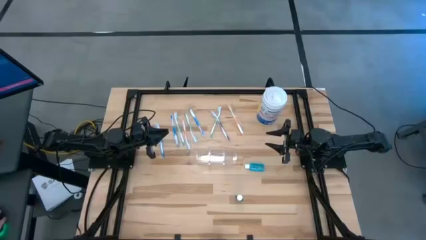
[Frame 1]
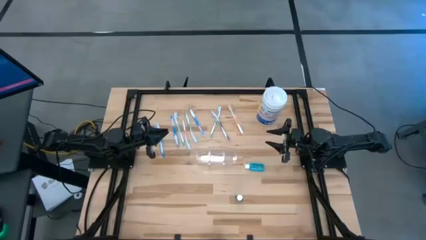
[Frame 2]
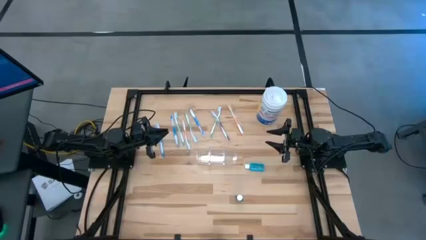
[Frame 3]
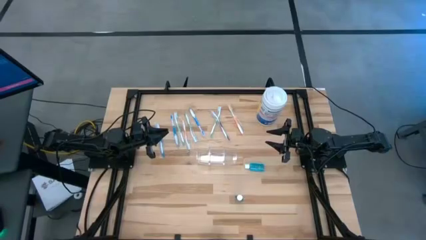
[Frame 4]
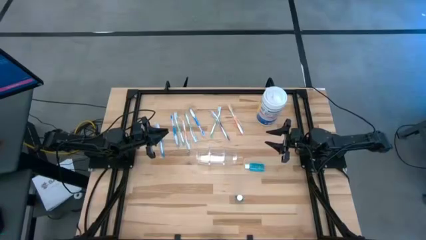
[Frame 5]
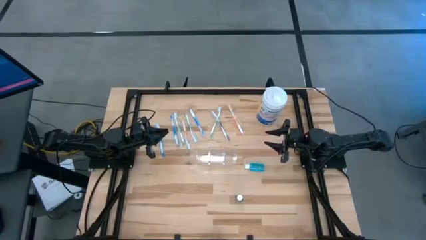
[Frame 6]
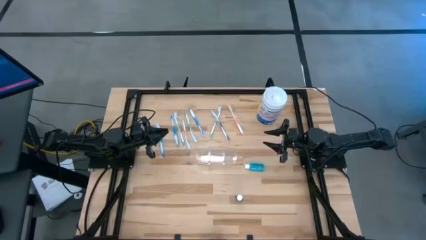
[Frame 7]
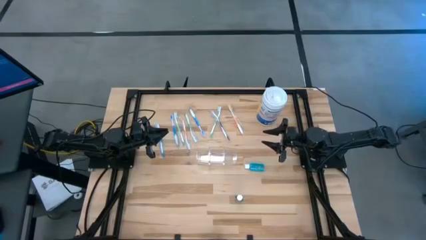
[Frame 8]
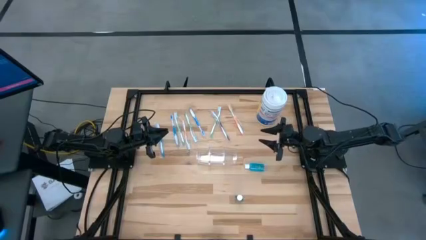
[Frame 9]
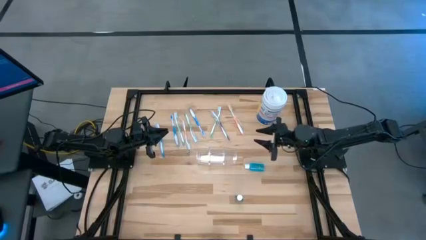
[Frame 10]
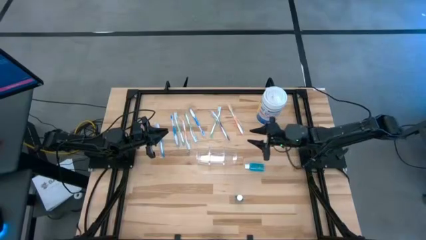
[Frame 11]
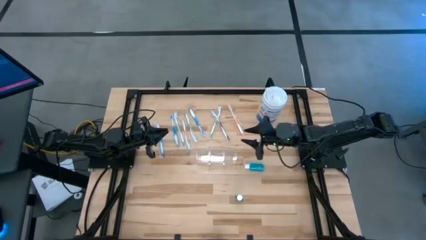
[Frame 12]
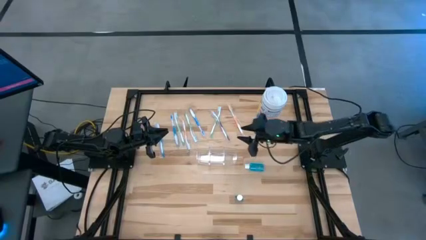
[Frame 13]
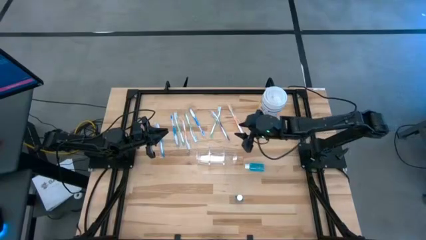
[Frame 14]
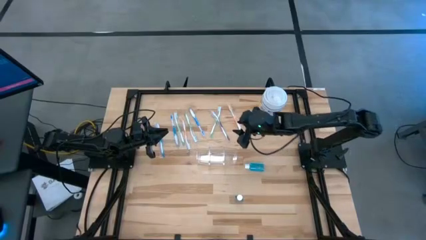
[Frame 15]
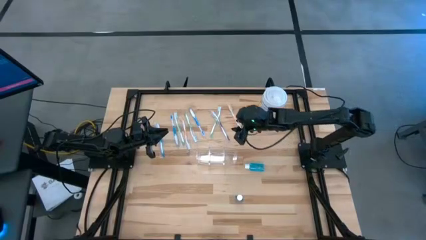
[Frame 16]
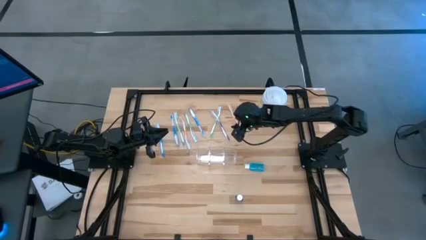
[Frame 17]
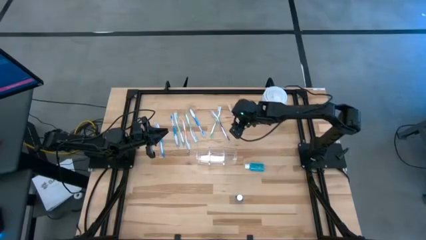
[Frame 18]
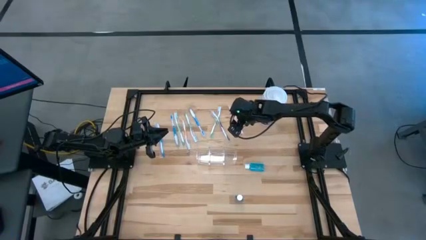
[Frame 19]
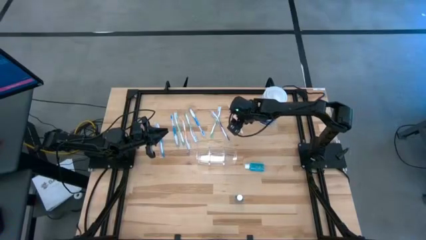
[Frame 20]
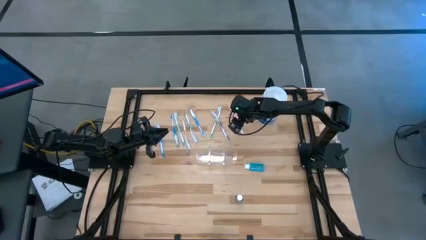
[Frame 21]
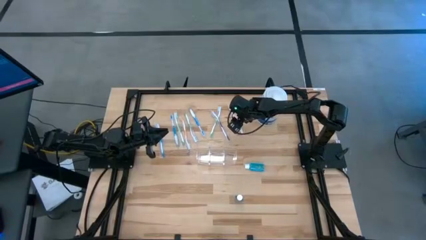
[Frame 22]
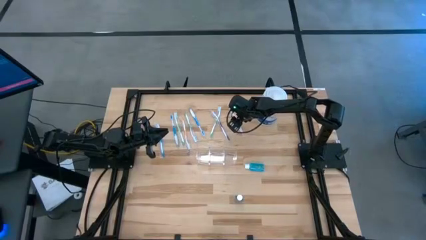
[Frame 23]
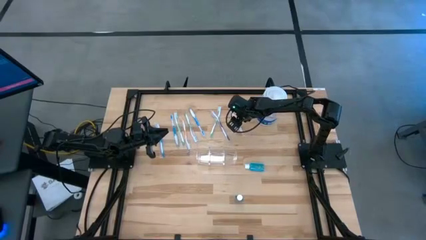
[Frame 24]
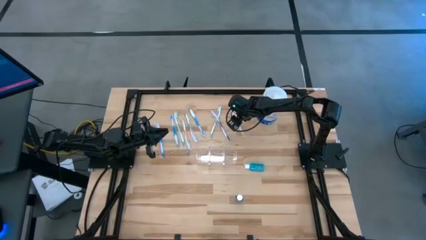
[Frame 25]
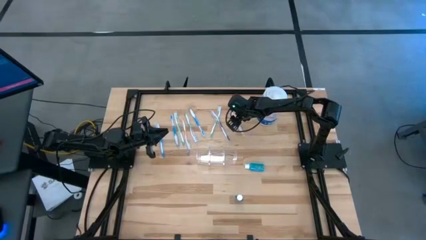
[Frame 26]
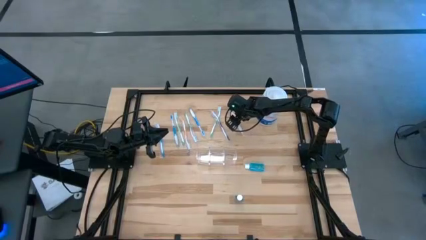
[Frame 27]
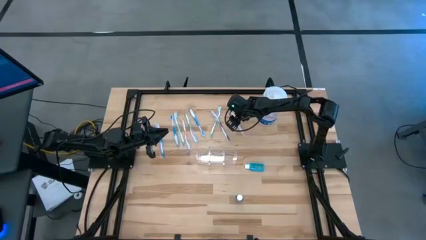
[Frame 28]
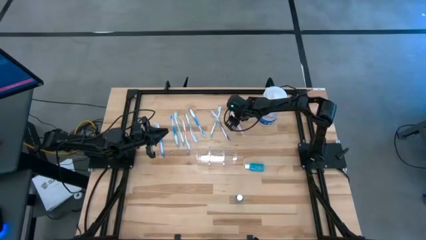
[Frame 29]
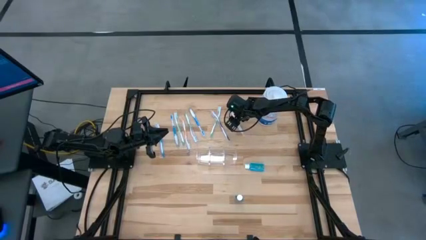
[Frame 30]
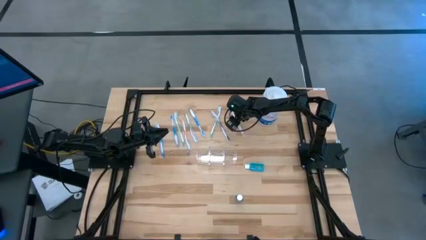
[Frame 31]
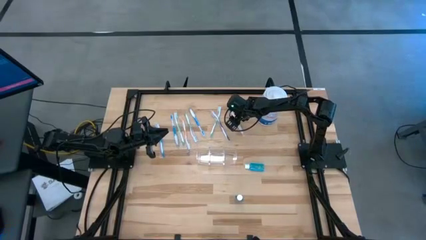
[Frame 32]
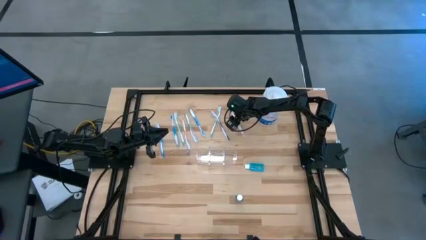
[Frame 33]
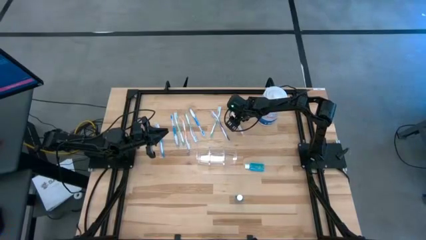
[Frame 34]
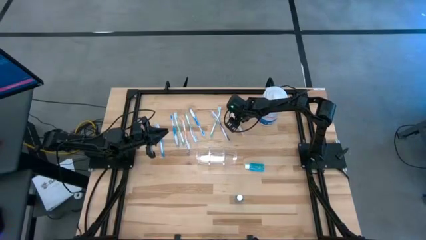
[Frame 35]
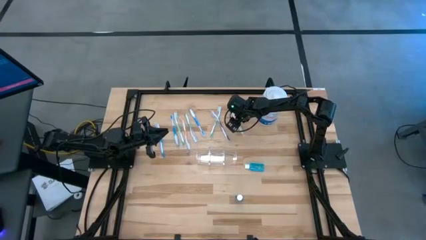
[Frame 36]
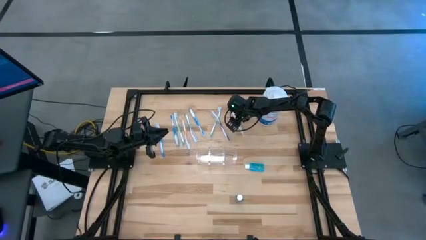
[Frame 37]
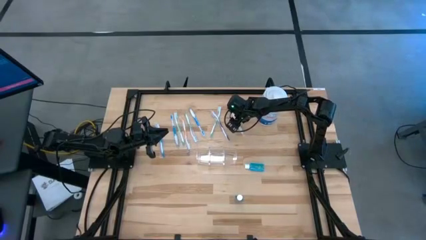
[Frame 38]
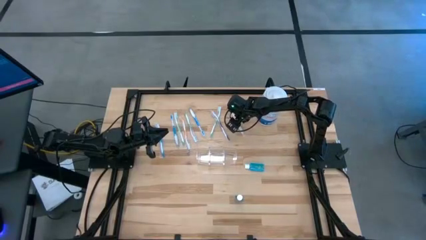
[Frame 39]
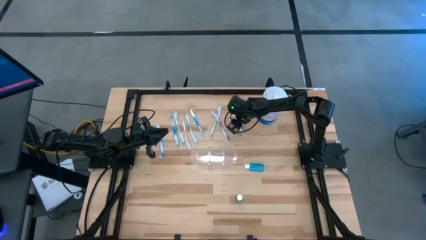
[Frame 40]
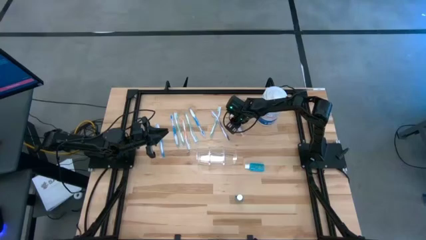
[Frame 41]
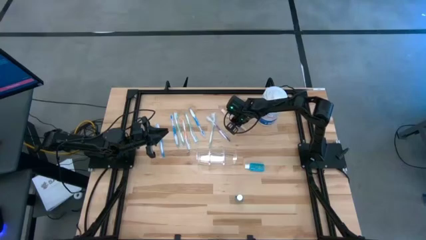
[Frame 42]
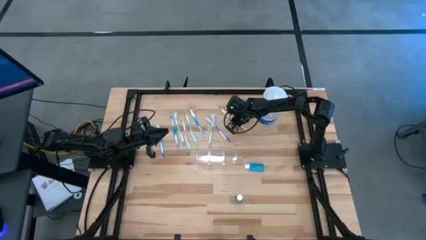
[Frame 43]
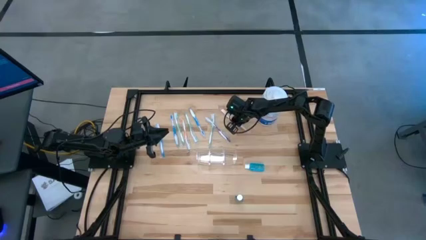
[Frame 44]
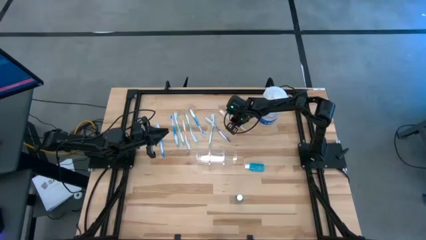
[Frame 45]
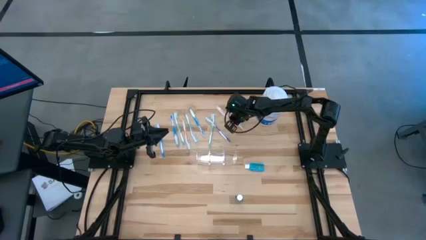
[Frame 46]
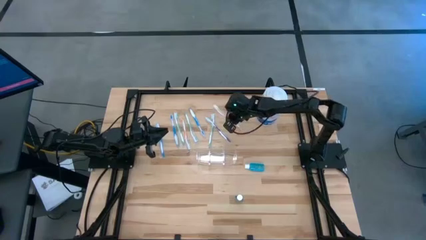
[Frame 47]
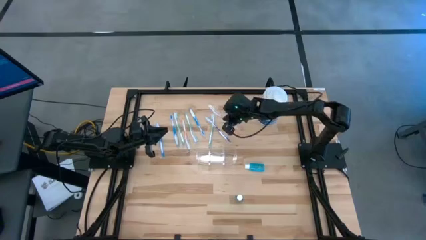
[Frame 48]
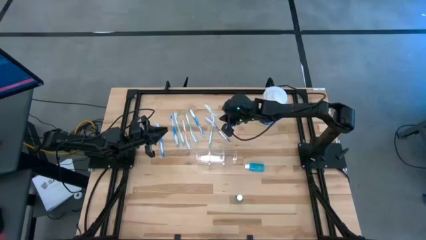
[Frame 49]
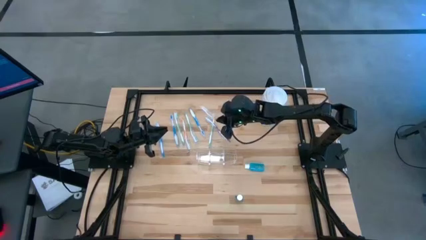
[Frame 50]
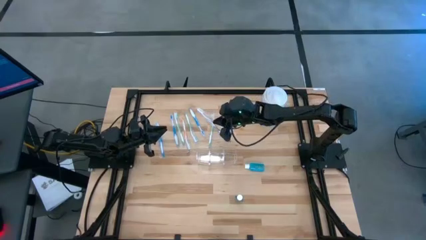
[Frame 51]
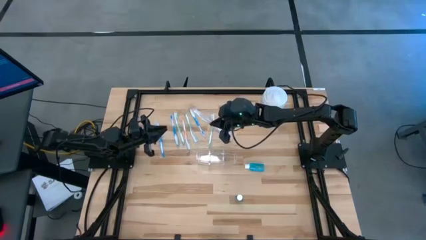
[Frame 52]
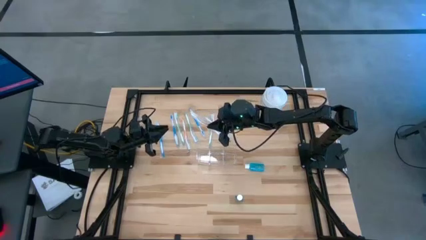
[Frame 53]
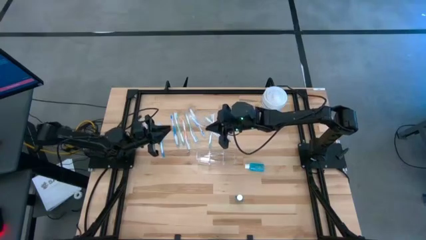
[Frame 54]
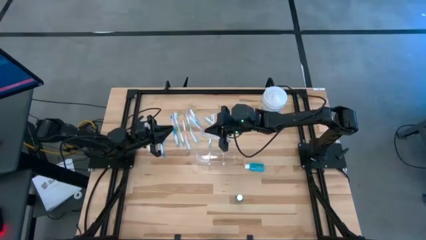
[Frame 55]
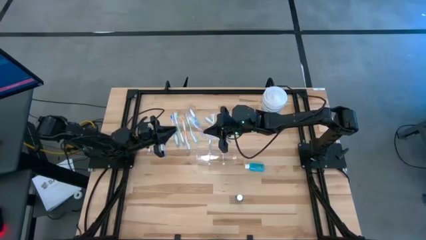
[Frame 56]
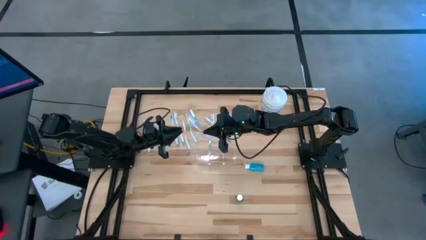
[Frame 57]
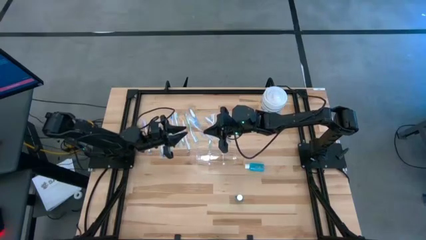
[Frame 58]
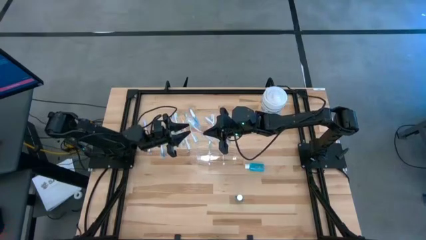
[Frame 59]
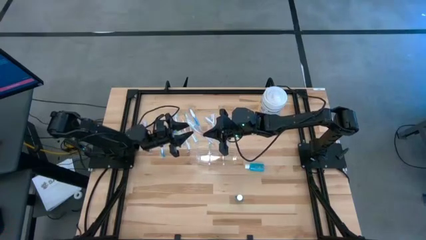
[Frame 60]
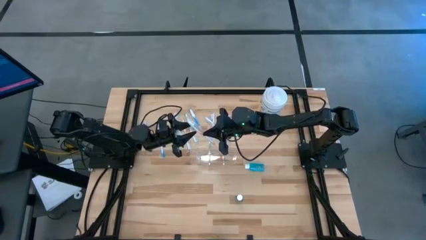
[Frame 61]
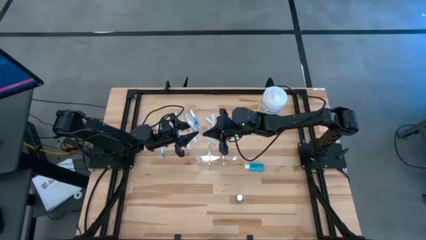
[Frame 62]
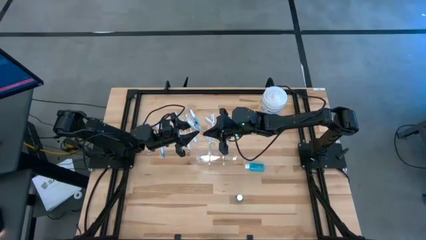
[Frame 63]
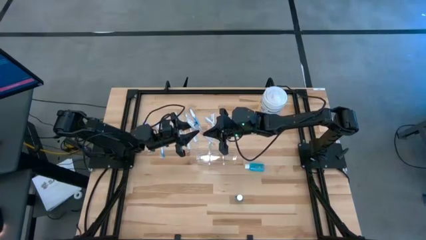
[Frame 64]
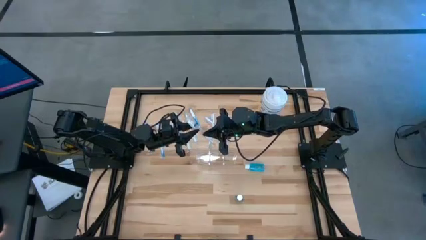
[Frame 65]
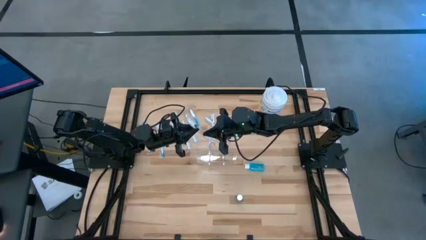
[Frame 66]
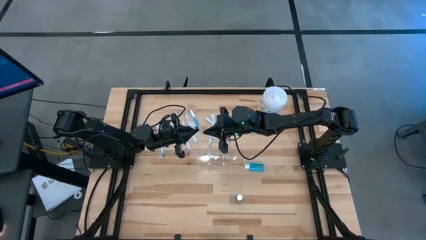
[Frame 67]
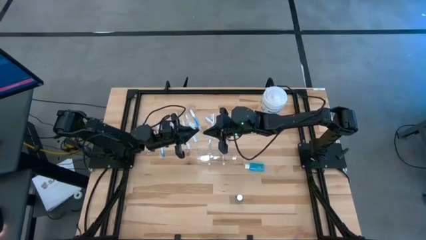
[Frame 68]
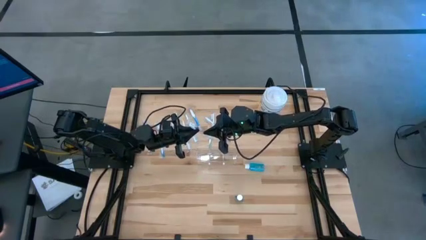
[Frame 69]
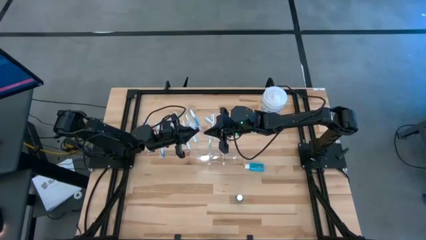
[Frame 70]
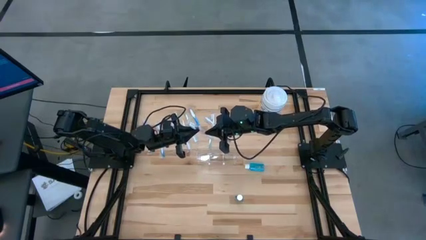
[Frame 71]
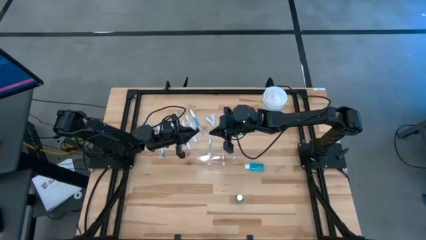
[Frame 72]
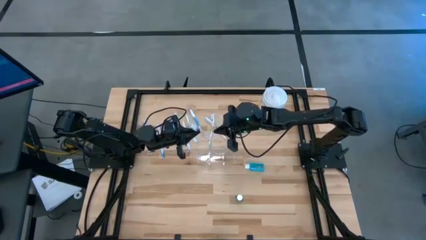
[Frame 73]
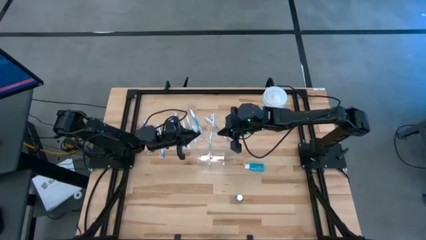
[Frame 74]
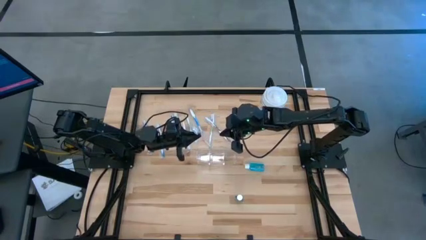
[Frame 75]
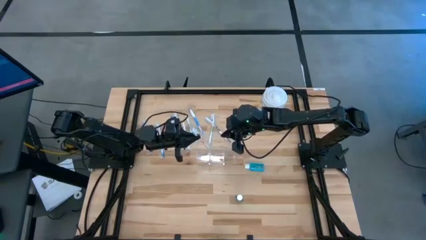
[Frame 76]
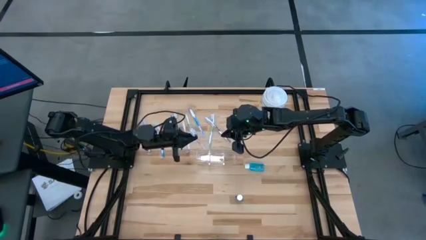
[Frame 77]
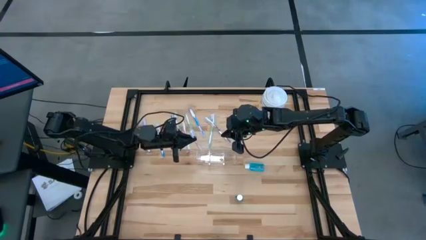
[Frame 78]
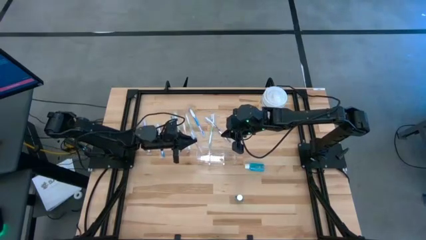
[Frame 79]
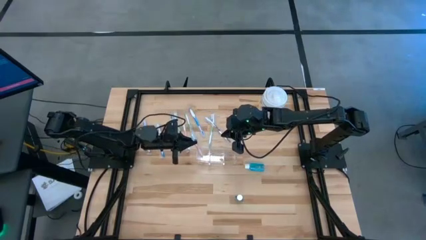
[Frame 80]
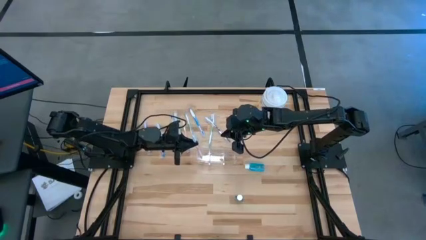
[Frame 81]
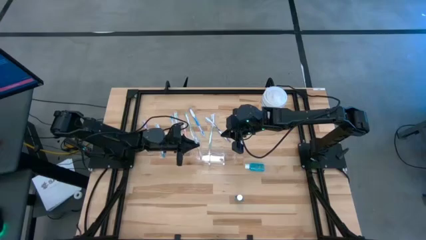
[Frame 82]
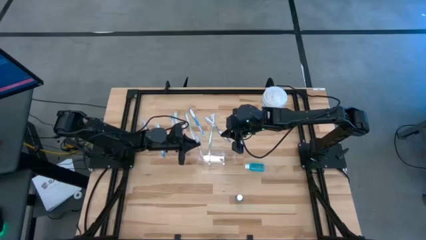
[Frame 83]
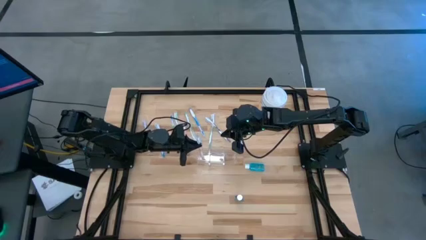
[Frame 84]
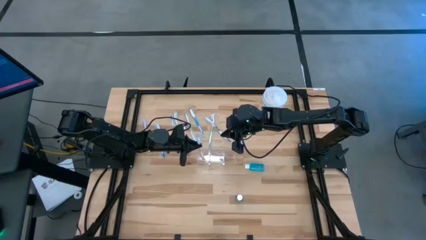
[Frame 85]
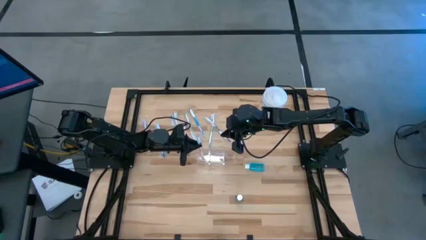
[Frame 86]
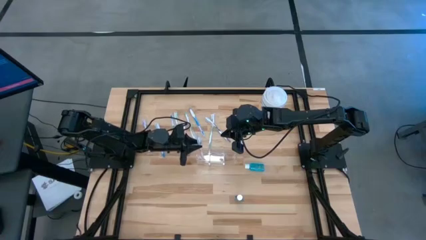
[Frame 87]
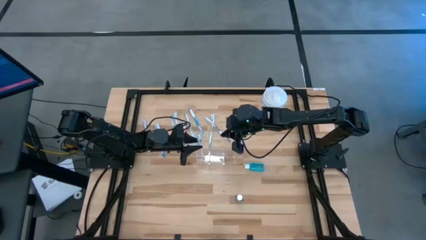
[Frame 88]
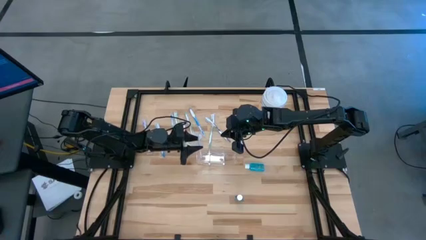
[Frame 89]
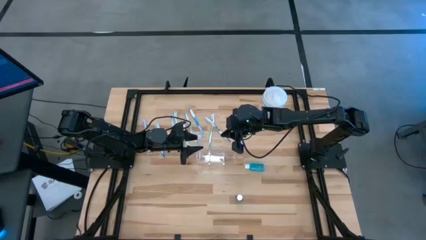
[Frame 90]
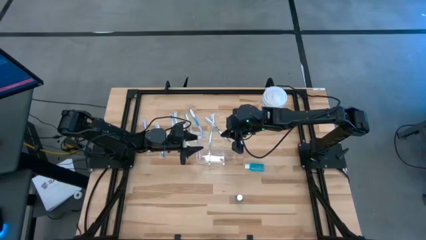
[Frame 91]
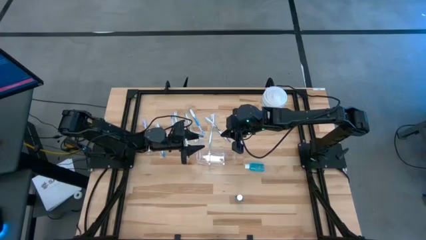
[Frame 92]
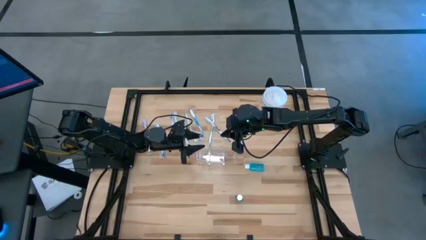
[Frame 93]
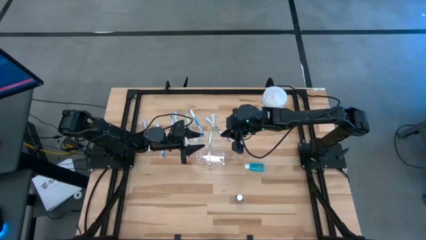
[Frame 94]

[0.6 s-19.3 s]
Task: Pick & Place toothbrushing station
Put the right orange toothbrush into the transparent organizer
